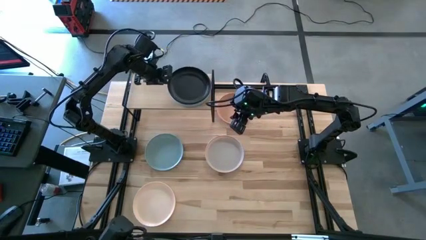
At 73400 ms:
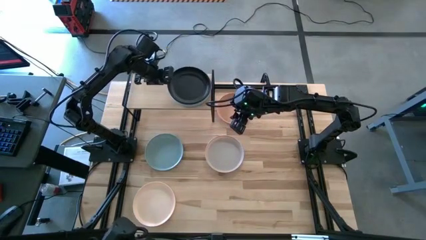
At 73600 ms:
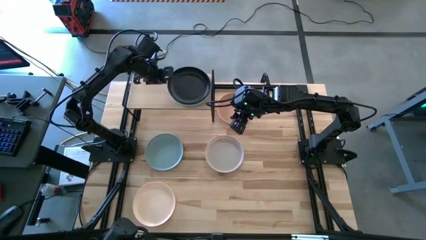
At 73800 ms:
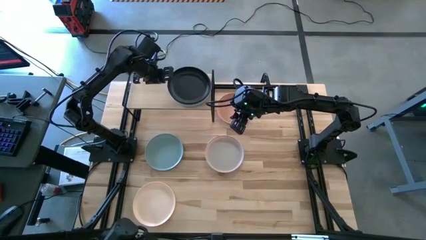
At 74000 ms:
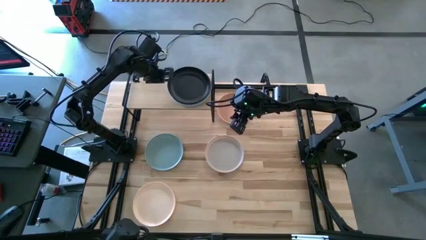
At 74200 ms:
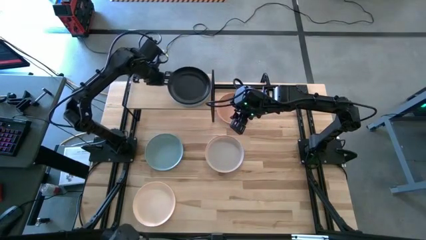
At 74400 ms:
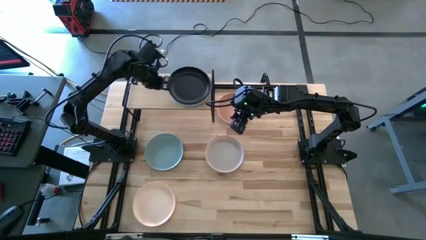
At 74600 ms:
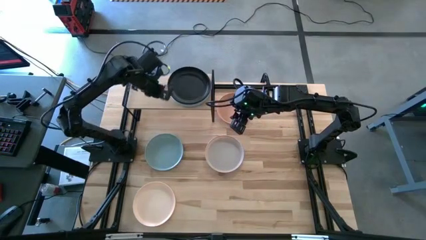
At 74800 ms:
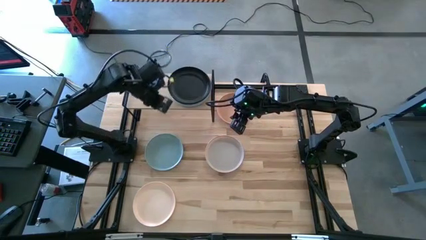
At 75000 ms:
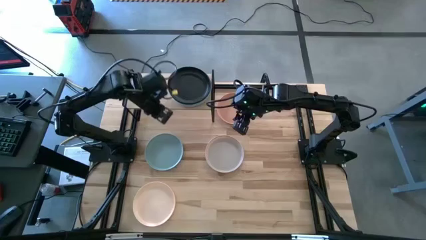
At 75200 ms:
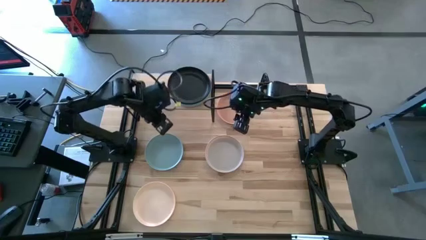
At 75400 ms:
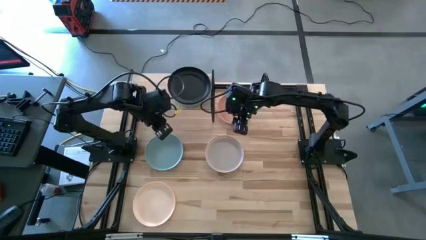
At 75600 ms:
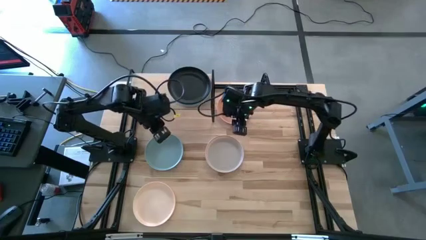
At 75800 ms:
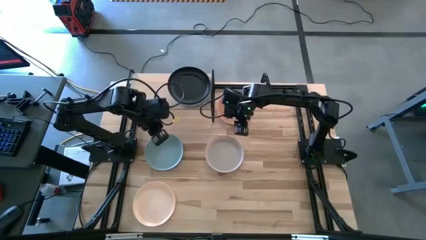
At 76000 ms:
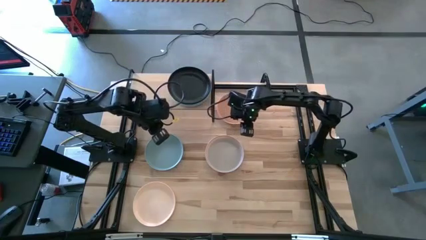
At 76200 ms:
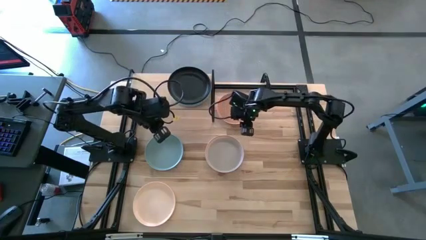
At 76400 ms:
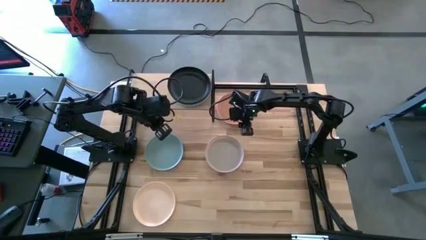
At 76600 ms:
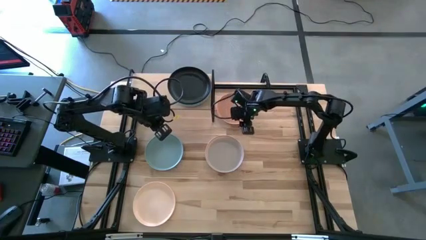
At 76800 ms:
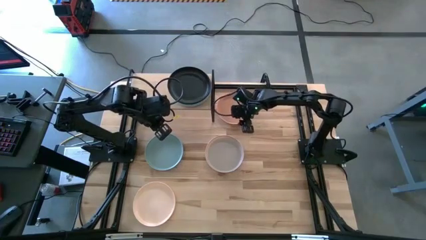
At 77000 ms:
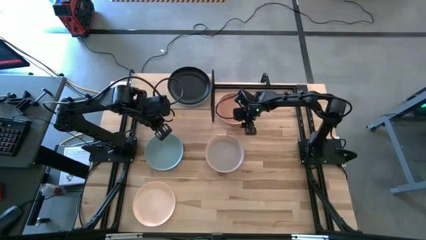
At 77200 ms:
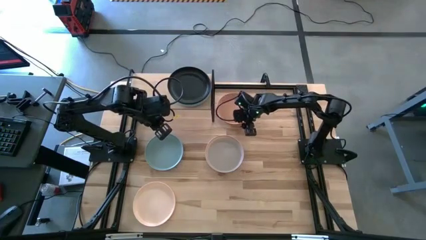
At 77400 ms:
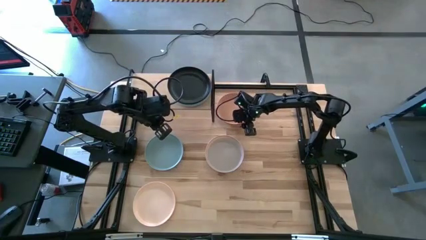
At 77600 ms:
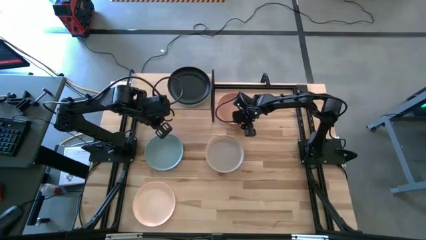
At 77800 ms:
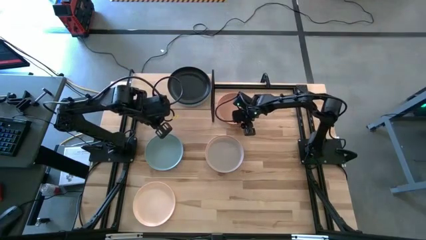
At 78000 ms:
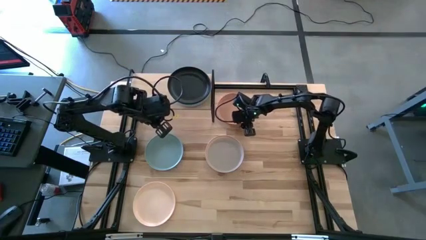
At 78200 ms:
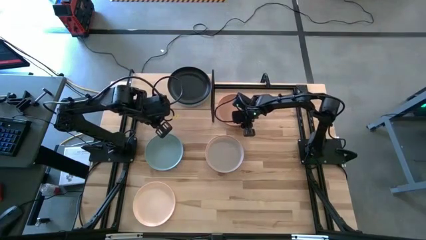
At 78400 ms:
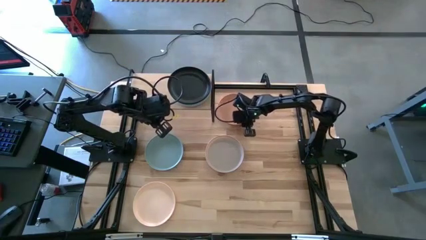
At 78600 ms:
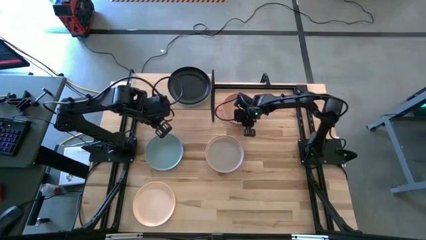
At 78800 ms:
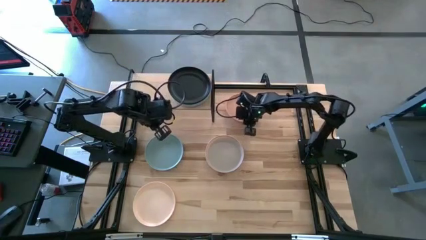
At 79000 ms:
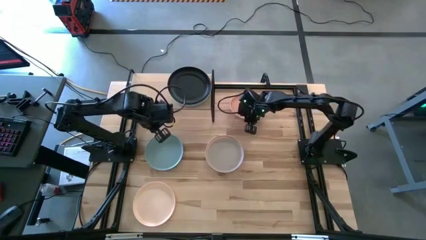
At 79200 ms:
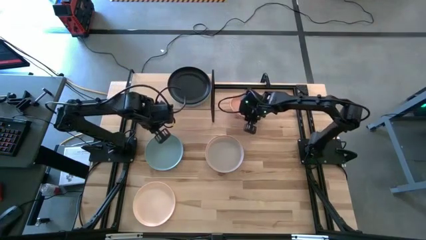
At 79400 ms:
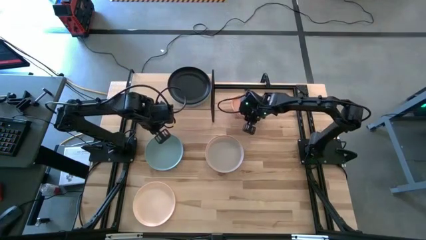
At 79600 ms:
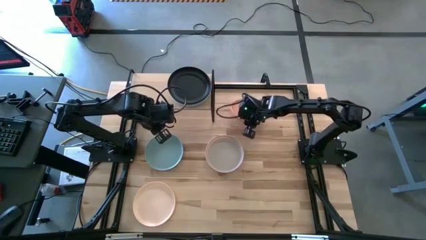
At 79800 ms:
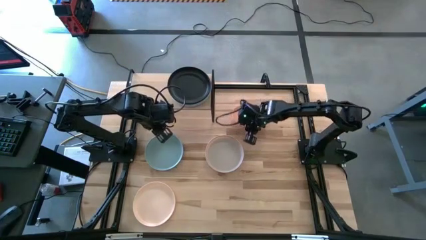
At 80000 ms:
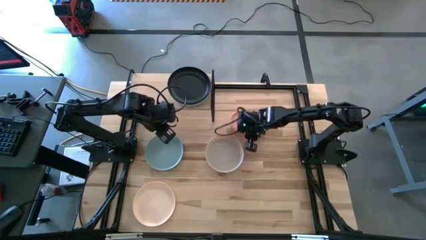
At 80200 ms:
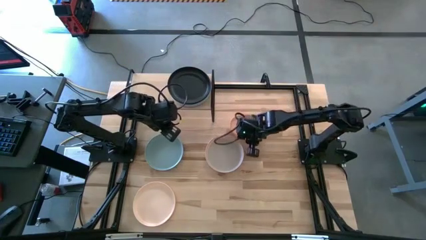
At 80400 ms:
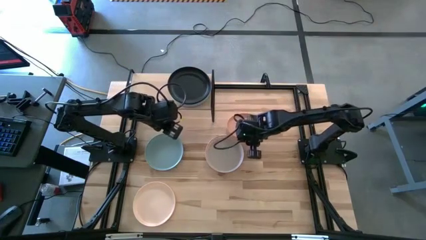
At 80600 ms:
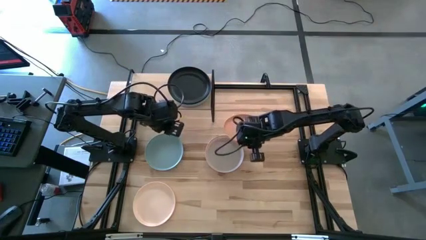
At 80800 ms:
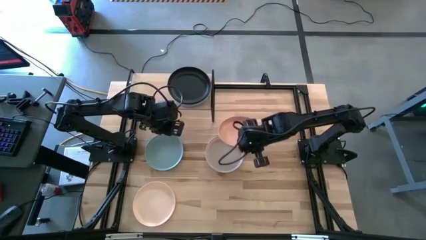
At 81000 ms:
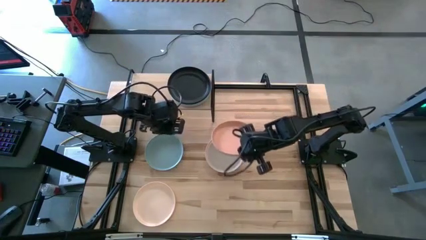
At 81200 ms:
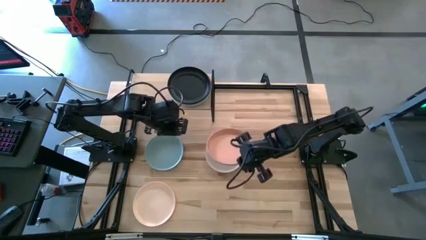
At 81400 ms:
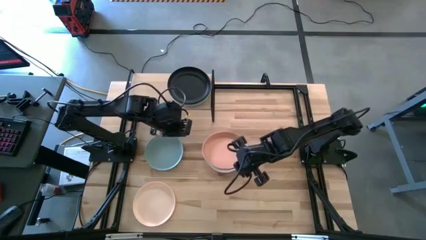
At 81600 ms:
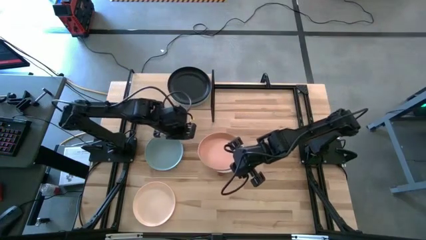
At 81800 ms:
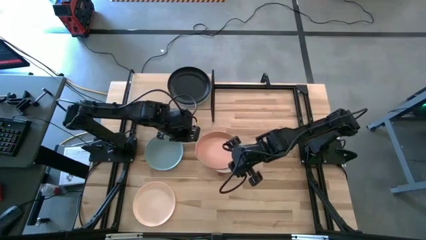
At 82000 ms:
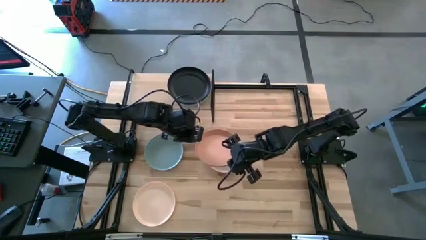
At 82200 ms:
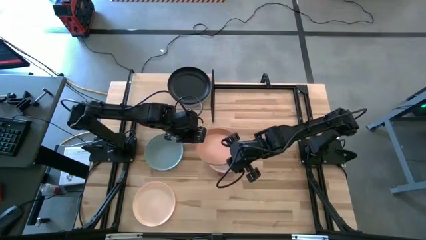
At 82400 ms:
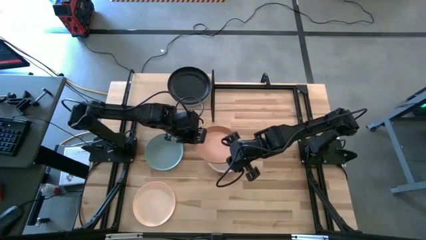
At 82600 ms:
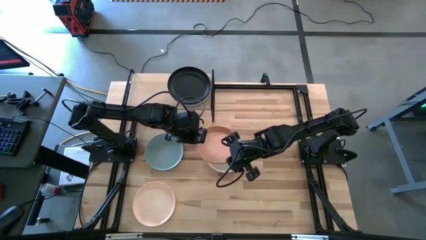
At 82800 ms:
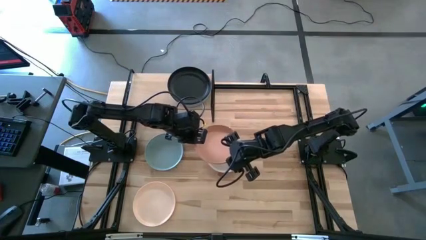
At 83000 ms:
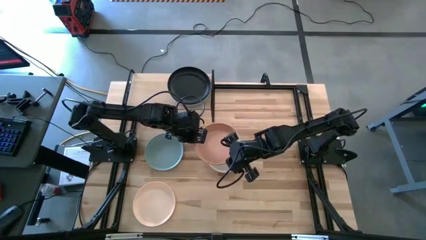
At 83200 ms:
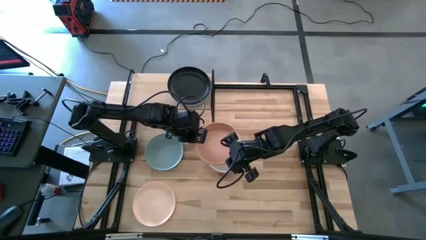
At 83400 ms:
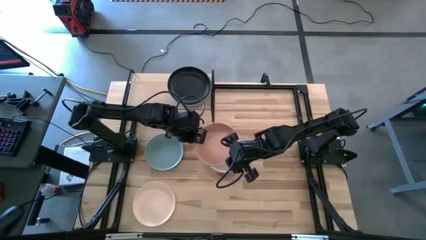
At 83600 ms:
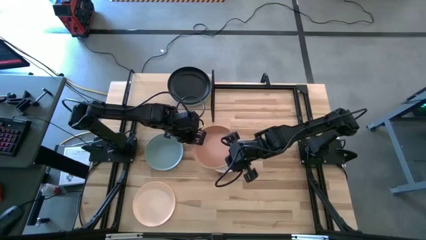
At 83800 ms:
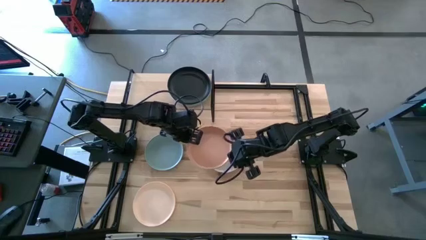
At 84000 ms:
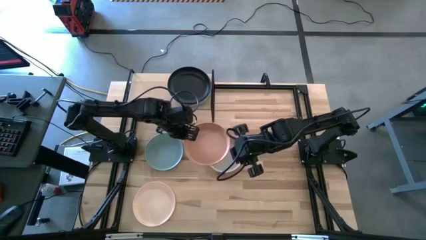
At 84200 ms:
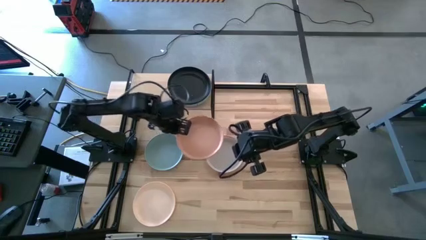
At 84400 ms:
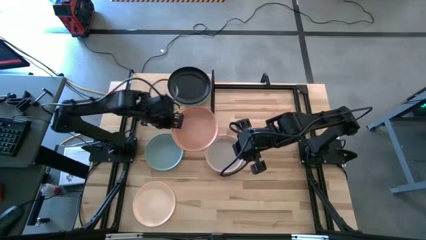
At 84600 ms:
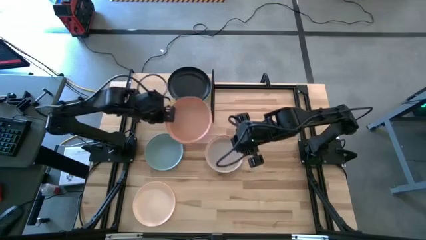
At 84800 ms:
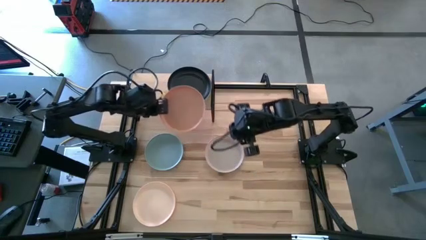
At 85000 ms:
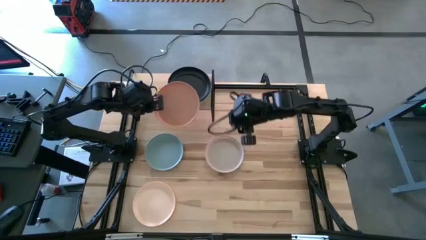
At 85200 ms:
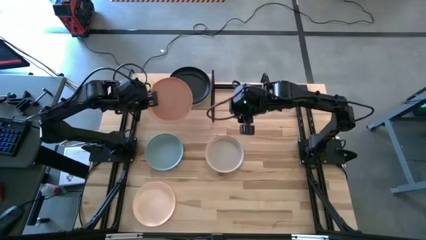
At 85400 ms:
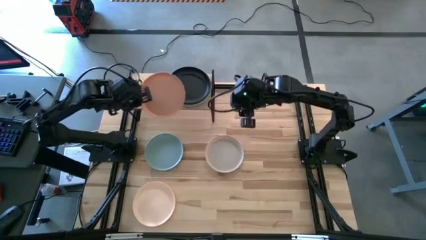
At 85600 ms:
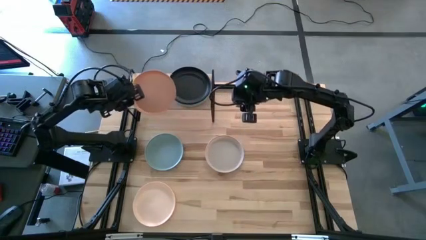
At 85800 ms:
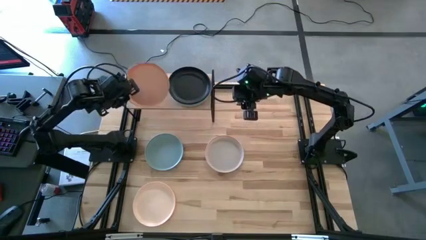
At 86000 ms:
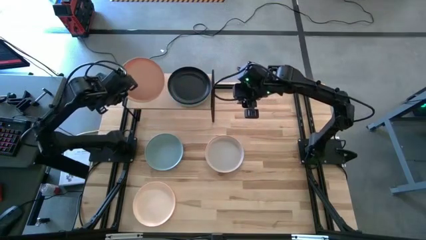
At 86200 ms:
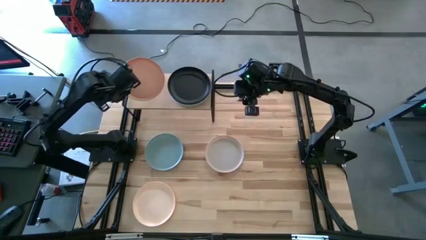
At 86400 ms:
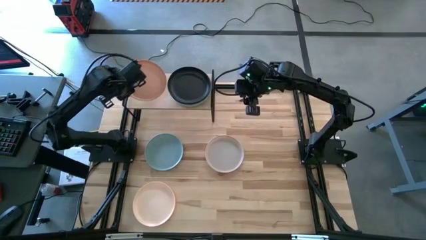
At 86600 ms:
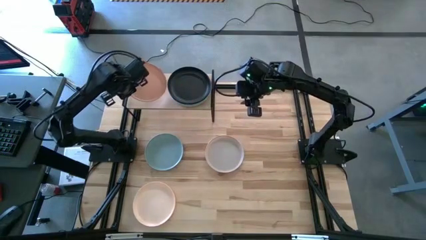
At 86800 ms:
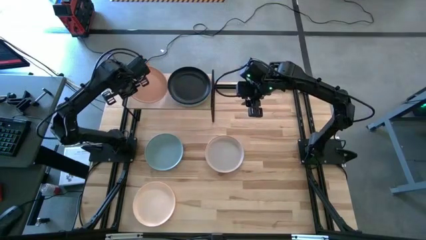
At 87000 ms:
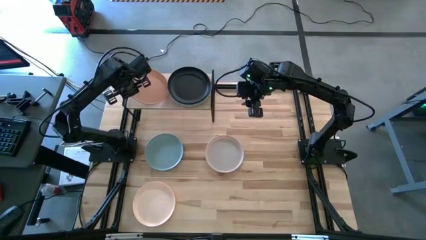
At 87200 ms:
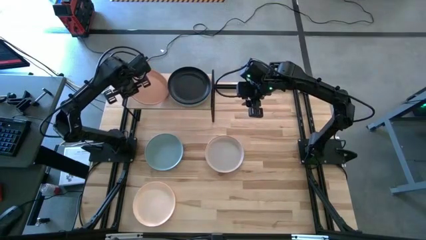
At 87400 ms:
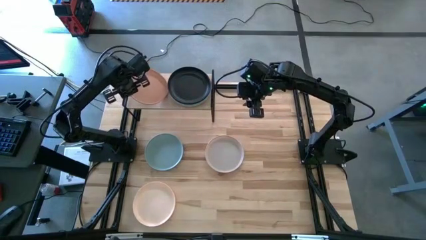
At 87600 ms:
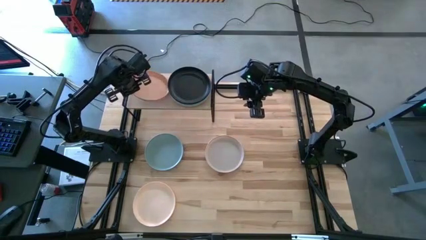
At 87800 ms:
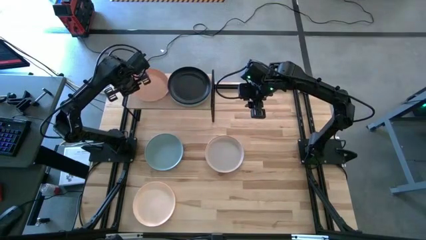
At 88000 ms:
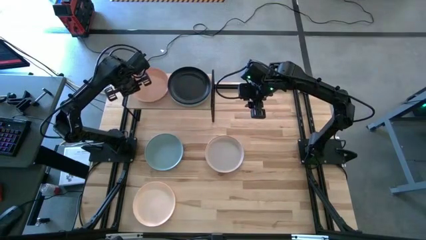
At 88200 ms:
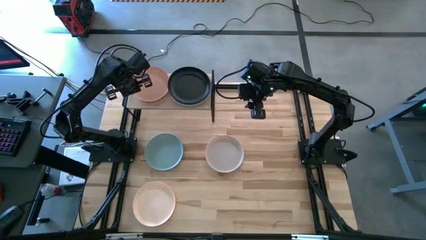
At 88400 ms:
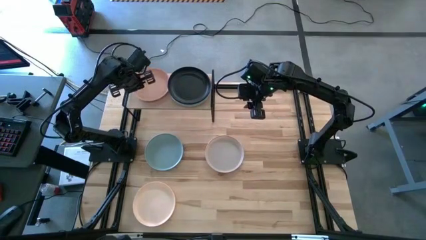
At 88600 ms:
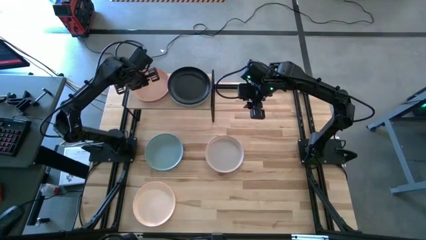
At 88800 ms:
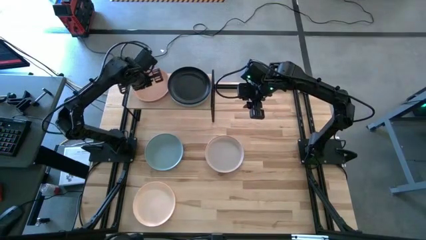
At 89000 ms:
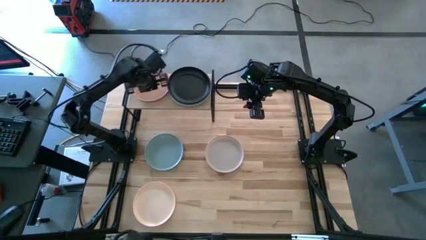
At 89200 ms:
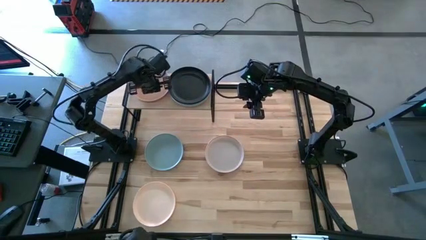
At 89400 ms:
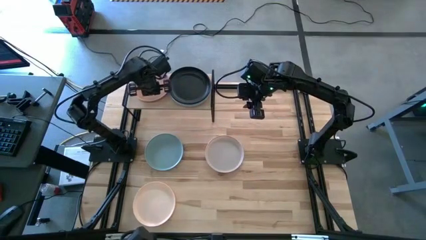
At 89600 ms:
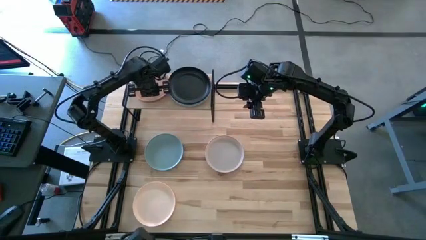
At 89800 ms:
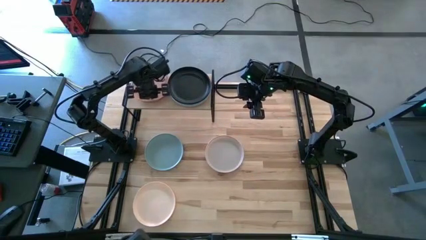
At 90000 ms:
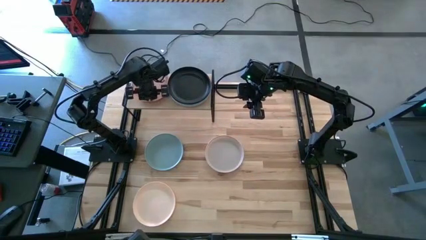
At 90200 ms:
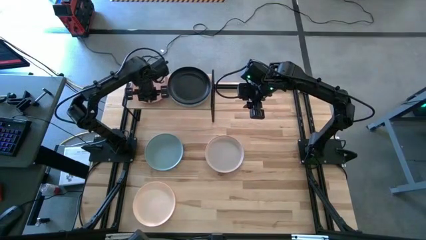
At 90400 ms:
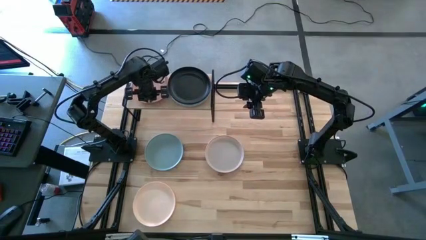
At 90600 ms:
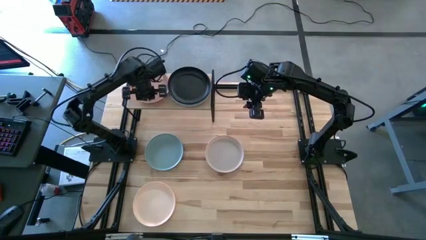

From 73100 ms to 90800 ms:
Task: Place and stack plates onto a shelf
Put the orange plate on the shelf
